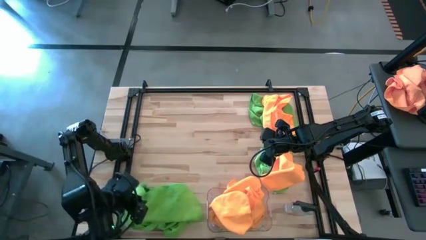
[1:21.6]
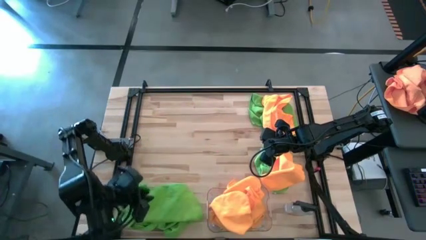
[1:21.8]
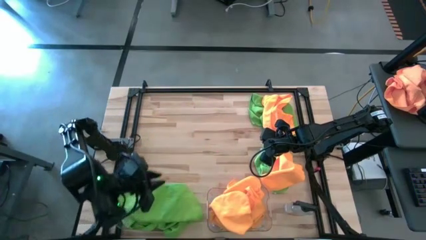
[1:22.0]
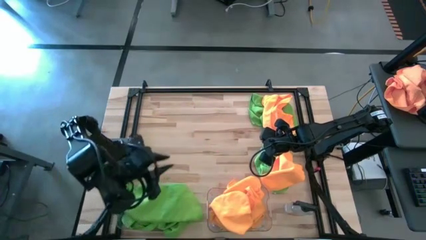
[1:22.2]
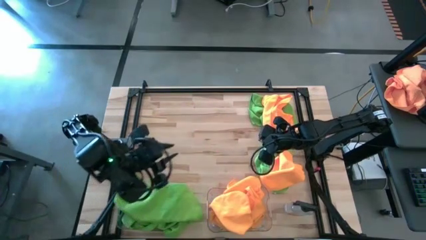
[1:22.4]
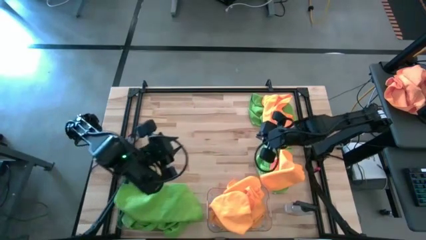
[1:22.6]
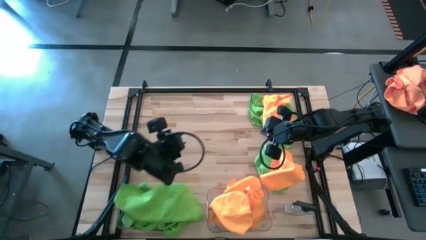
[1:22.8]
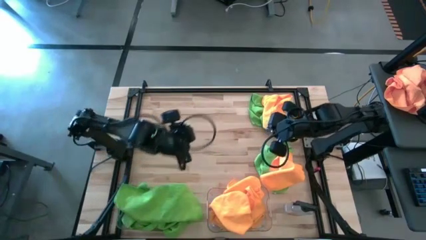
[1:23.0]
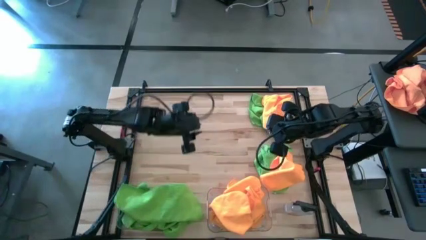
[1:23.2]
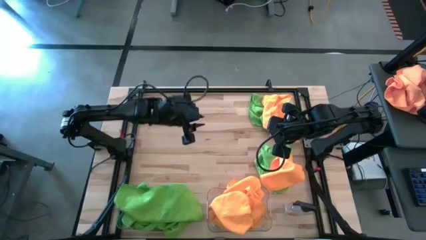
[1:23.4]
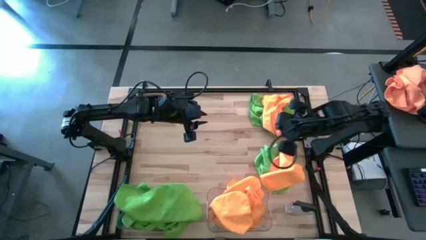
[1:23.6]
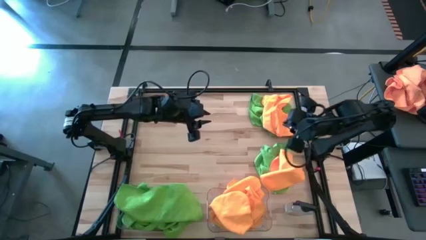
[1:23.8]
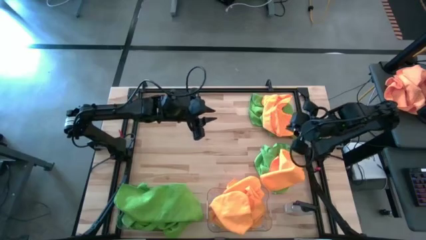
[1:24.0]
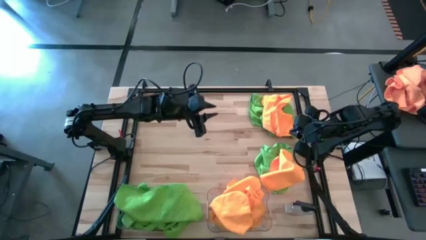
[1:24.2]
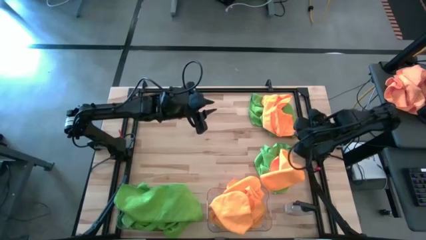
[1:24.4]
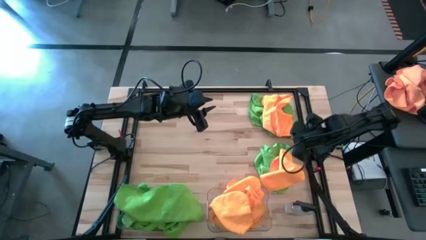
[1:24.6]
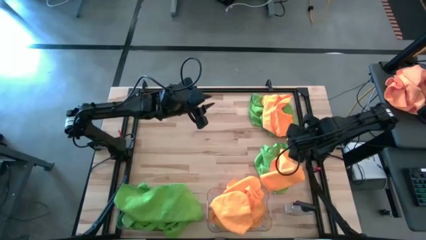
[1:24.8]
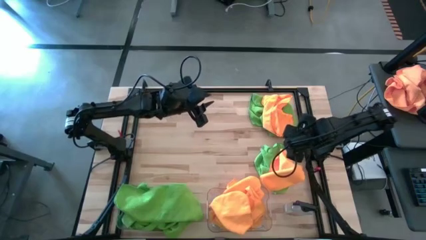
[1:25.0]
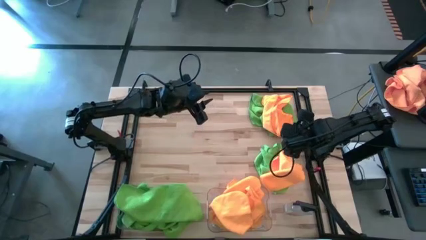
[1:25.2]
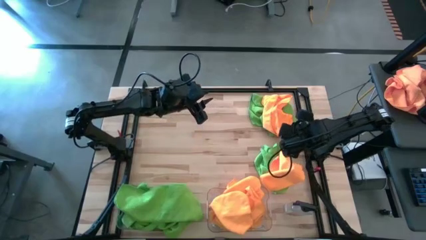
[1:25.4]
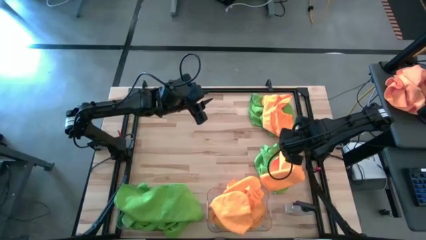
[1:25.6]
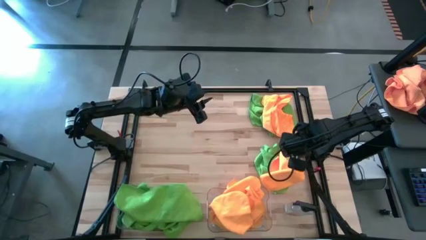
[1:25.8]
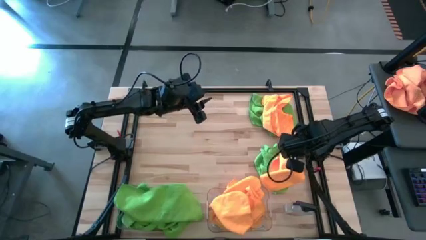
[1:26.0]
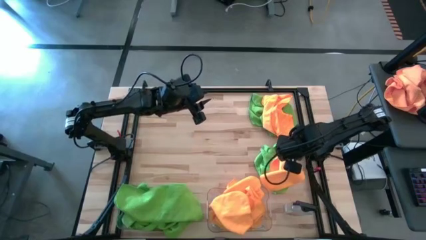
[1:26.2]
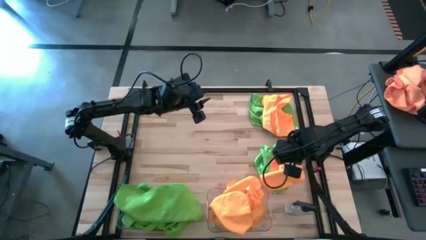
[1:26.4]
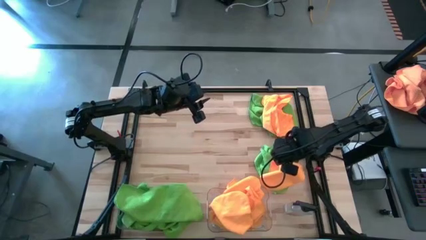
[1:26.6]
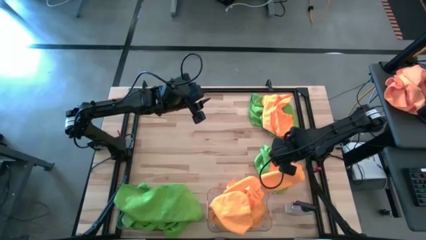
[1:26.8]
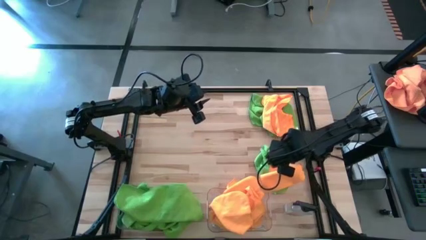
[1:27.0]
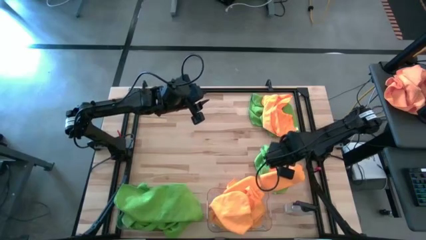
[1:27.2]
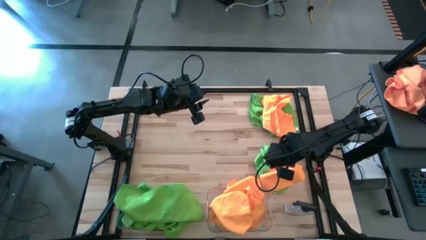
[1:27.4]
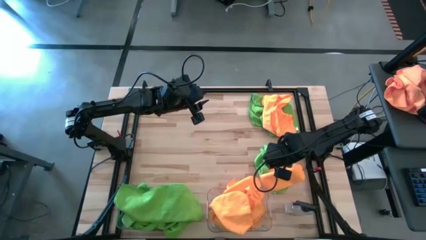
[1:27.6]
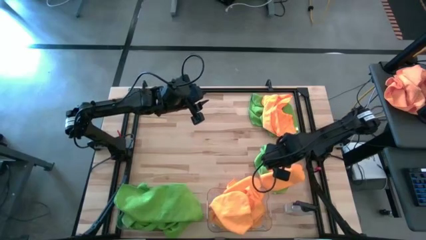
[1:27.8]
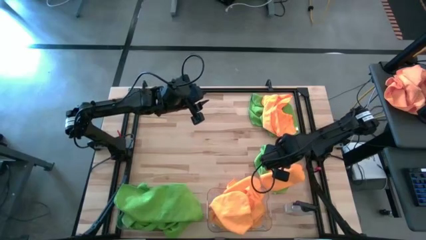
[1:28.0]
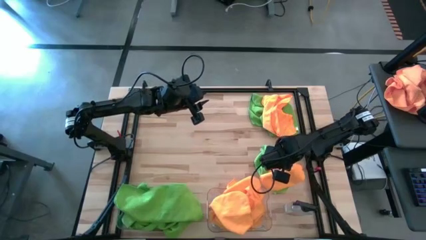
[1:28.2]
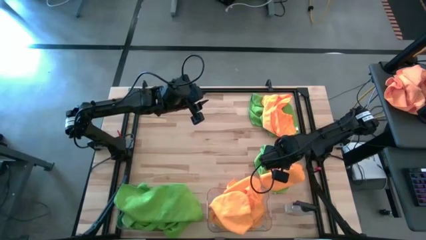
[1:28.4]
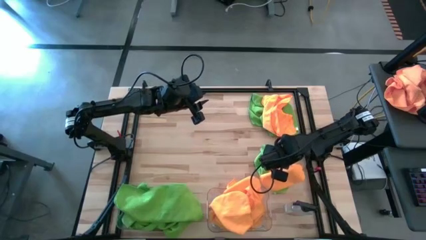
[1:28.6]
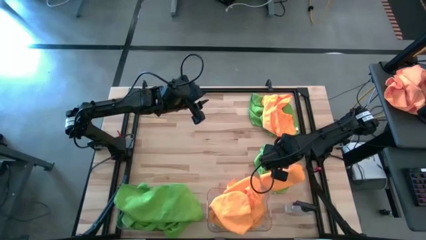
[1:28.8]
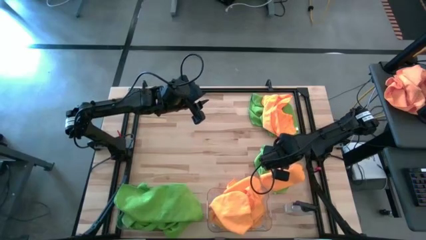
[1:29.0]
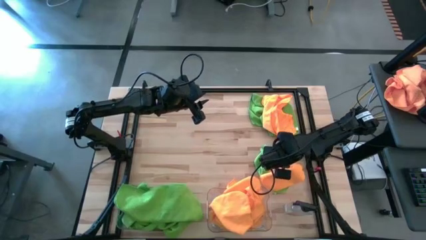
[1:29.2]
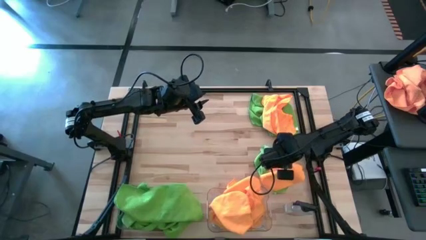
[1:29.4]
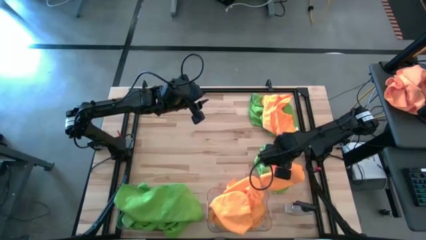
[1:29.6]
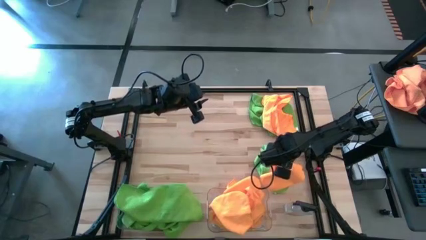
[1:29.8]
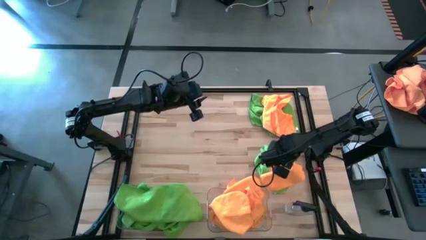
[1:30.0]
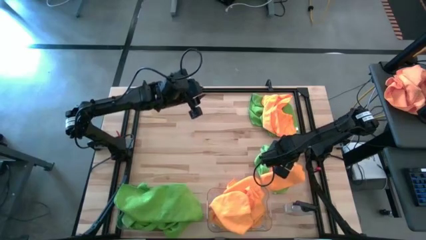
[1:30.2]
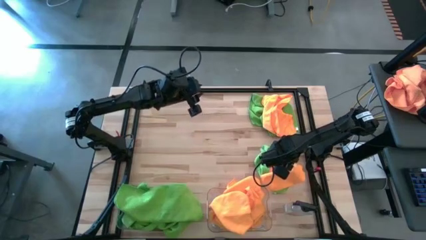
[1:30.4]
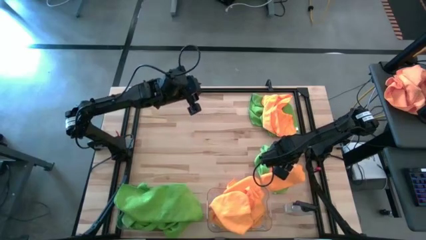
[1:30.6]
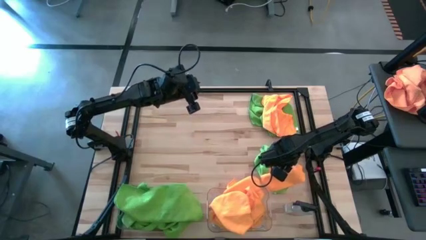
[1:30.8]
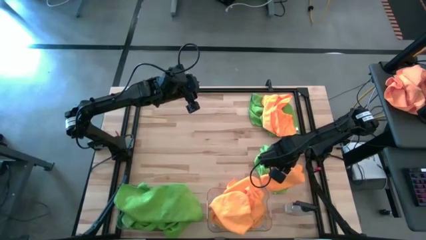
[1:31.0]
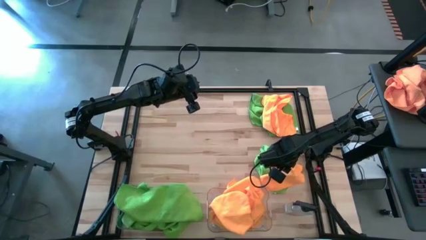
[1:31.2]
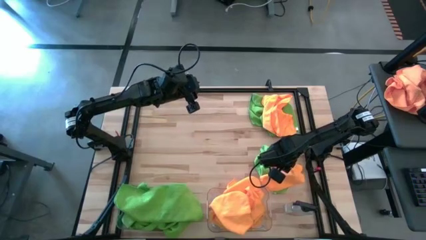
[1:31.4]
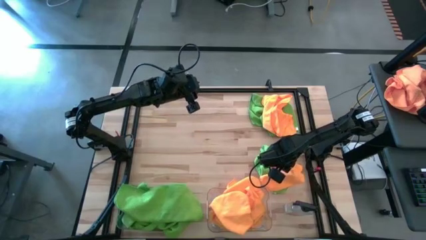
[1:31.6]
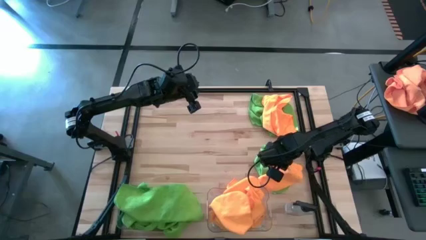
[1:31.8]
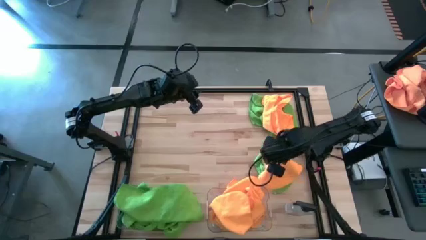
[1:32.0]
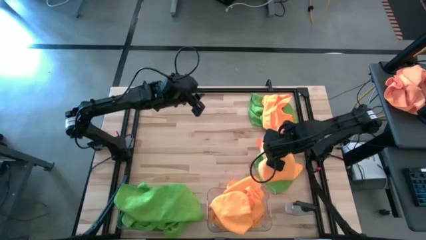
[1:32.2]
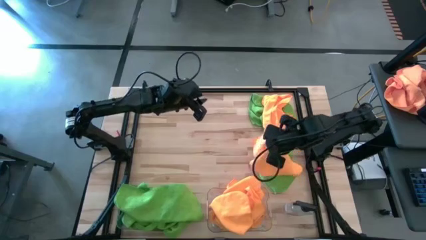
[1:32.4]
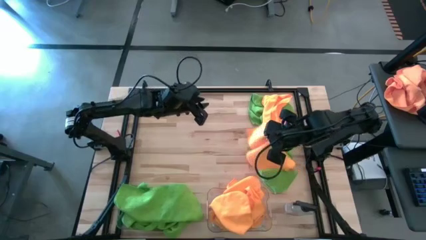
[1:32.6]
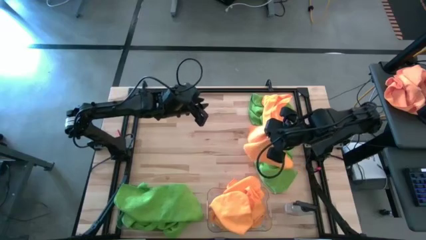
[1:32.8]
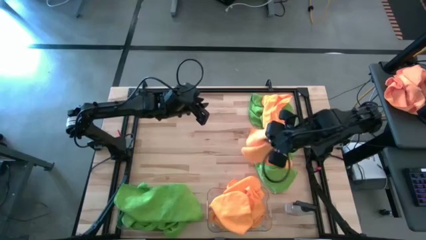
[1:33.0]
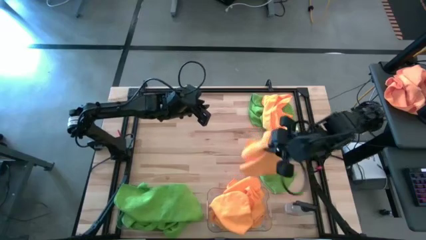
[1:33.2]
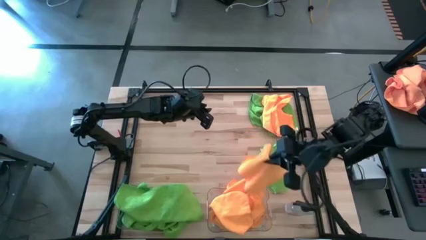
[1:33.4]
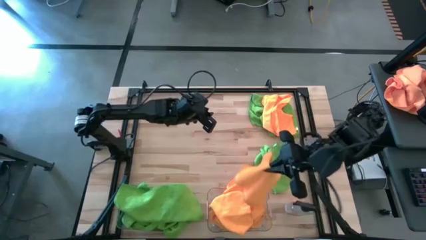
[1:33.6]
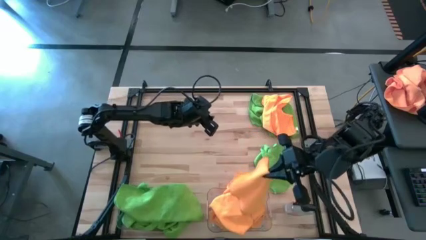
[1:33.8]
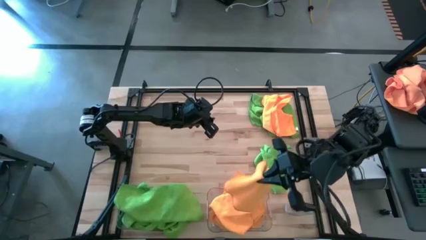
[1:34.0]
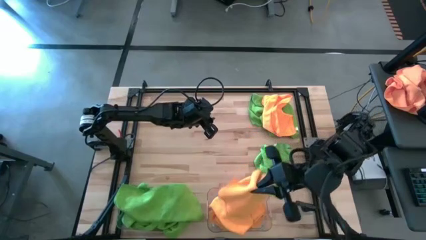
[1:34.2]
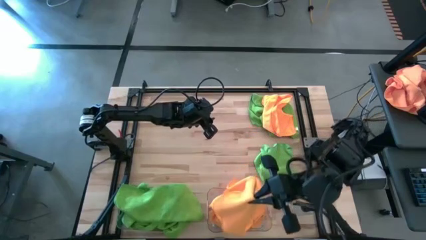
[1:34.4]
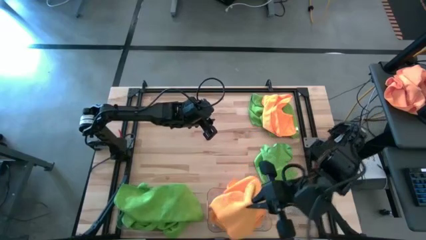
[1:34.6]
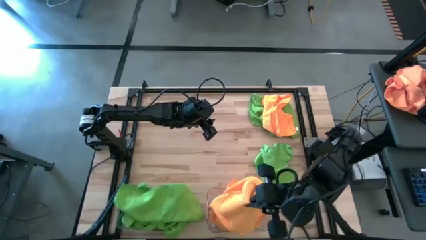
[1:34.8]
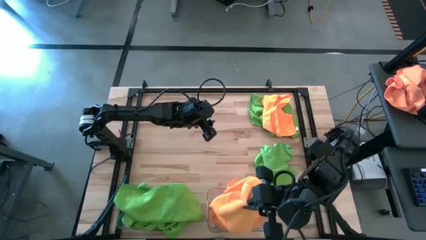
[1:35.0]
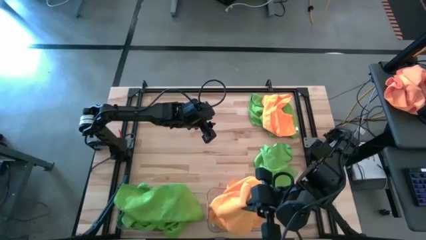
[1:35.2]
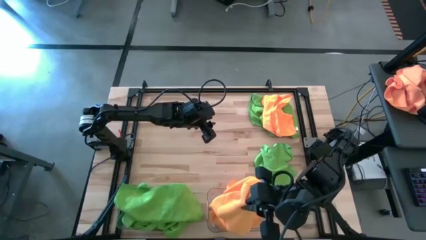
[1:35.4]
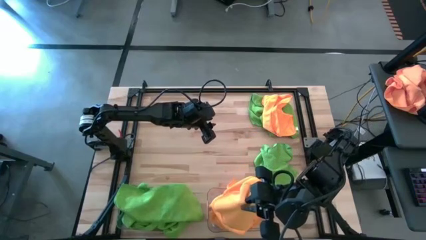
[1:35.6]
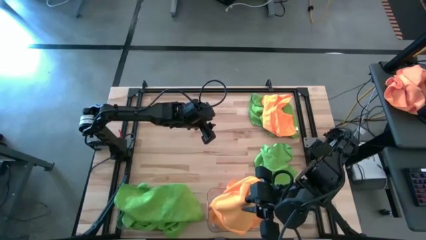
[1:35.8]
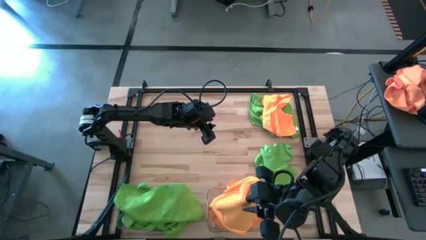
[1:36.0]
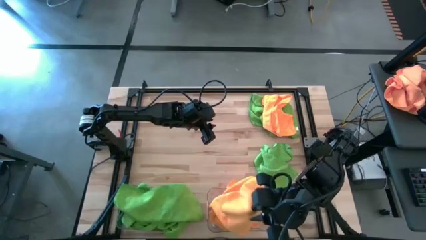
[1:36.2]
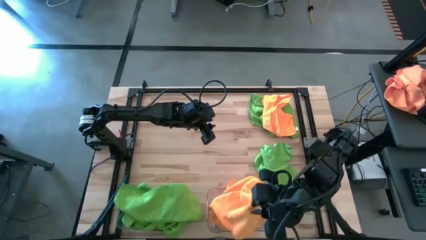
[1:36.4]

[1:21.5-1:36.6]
Task: Sort microfiber towel by color & place in baskets
Put the orange towel into the right transparent bin
